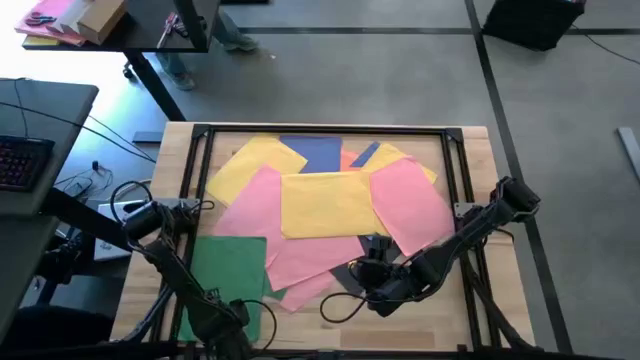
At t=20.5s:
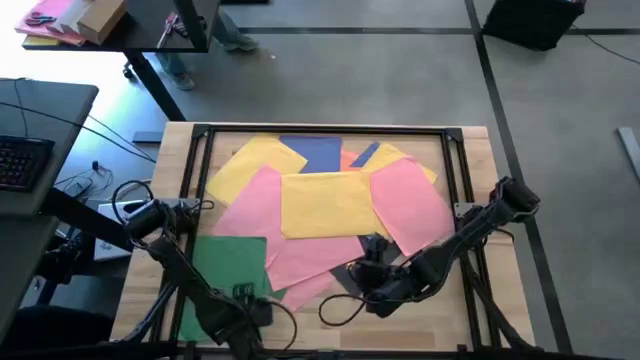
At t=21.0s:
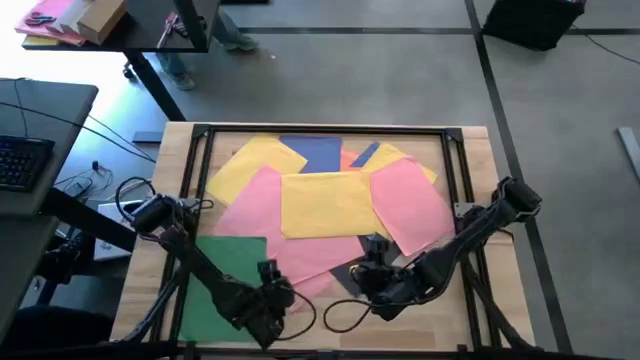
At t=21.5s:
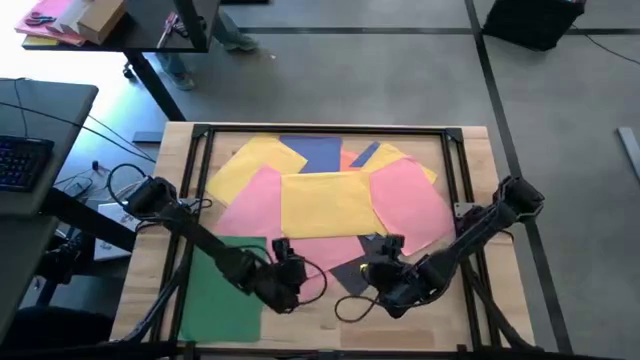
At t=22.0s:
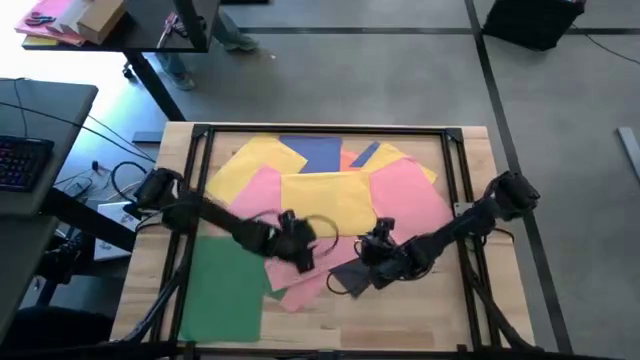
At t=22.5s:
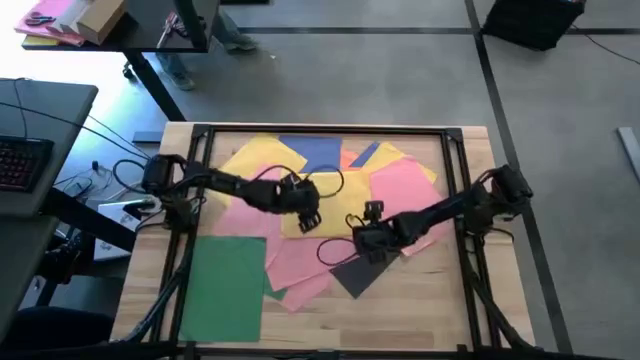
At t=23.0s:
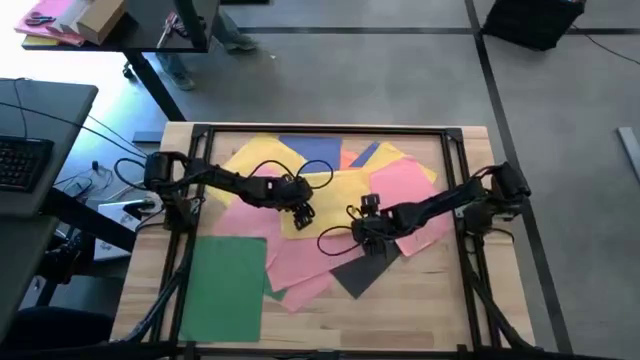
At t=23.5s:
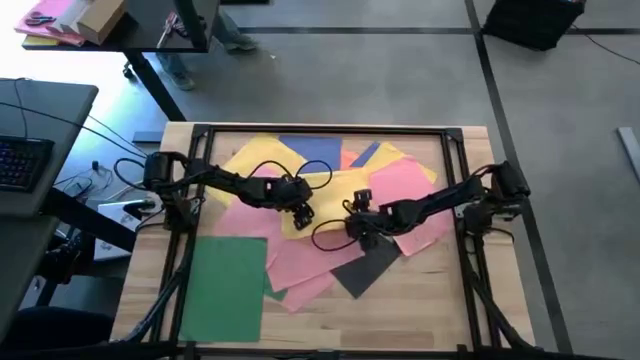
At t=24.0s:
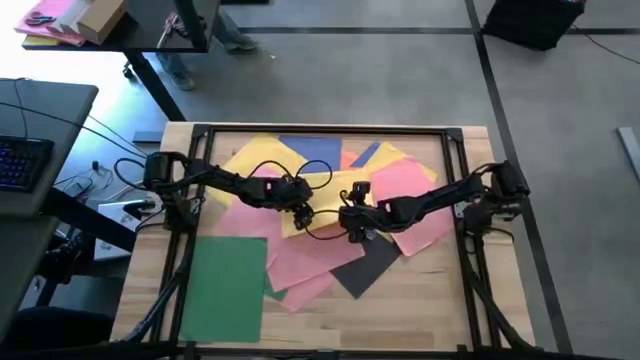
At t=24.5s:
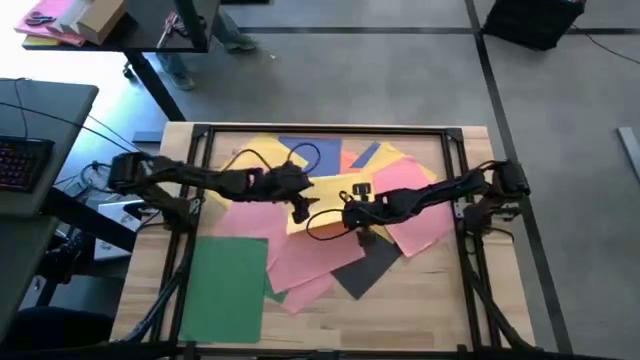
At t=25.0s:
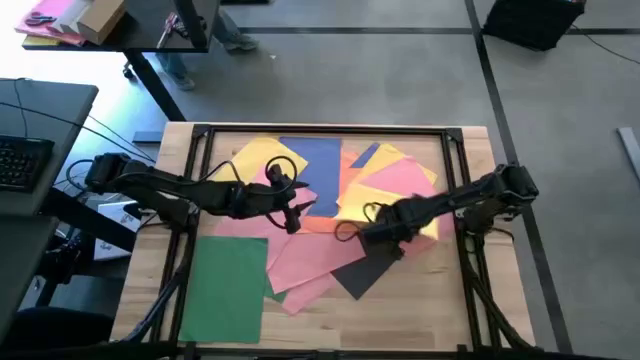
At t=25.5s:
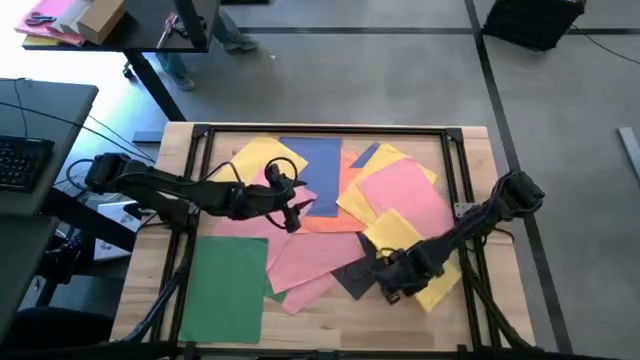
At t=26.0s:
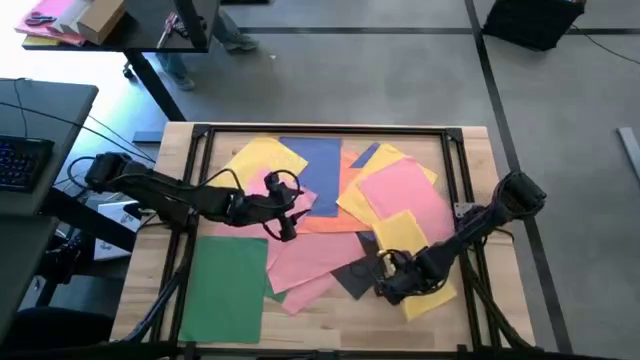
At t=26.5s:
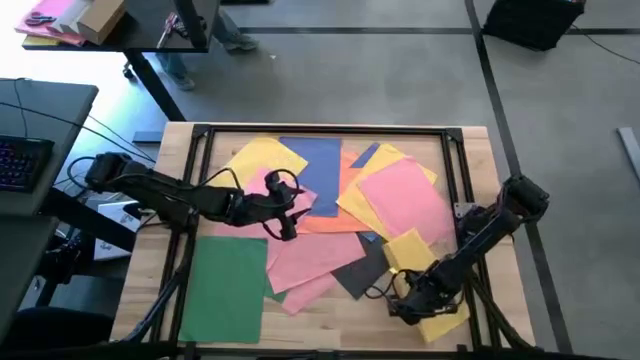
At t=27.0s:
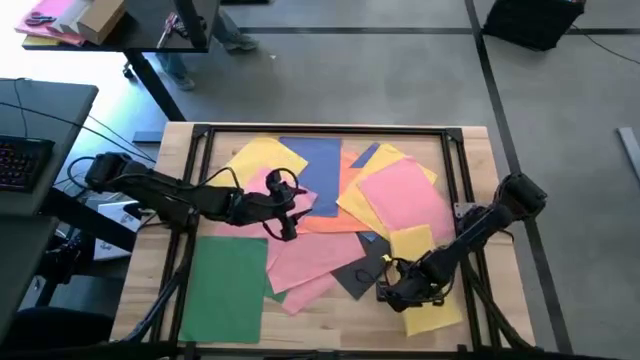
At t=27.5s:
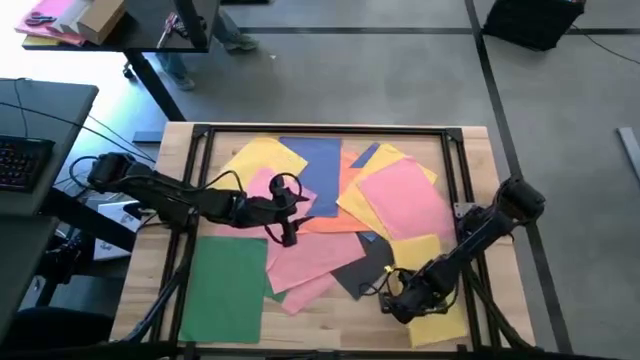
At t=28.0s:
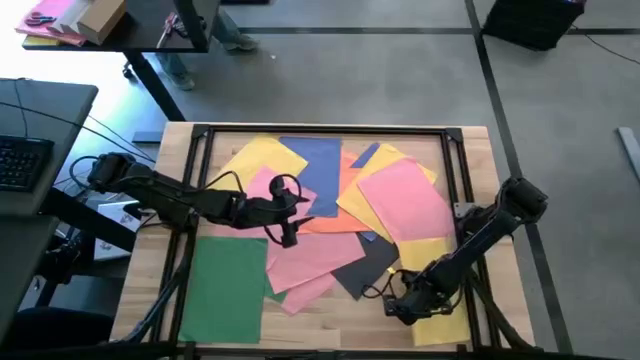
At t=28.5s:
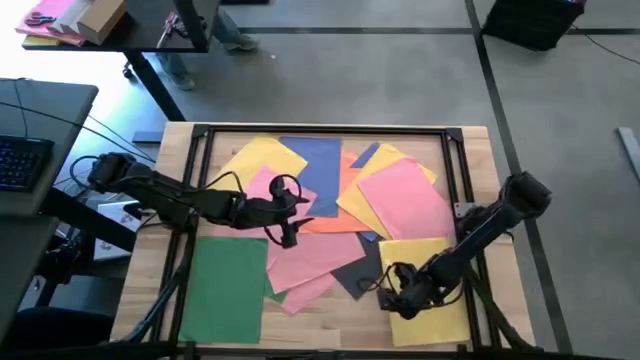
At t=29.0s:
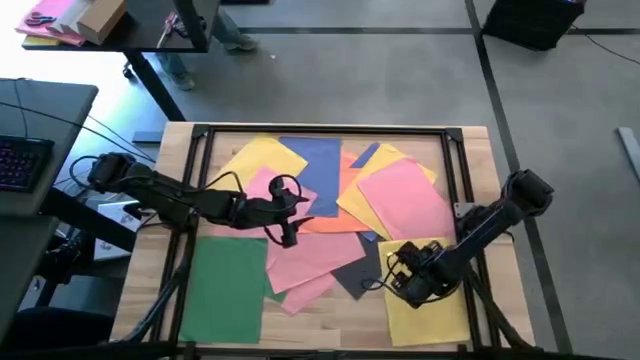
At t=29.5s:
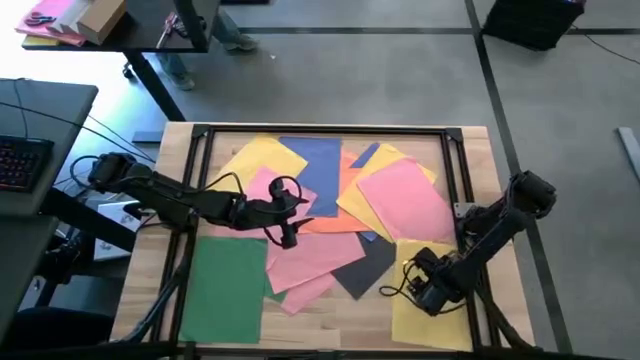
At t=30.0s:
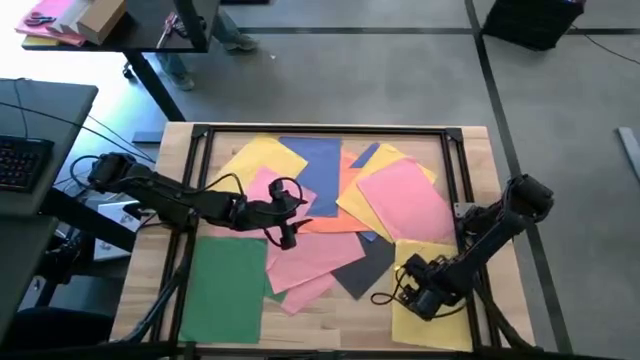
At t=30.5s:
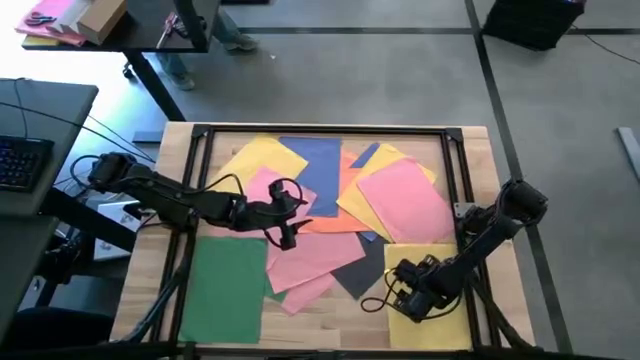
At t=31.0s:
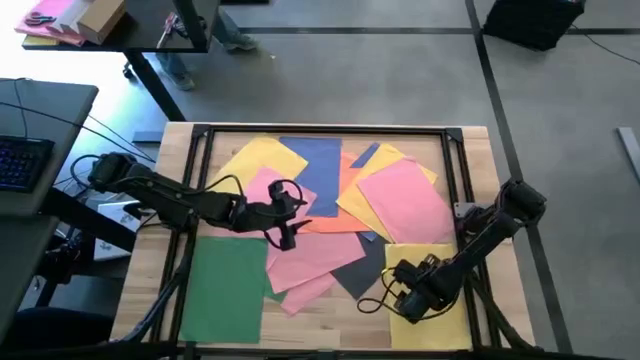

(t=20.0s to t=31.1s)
Task: Organize paper
Move the yellow paper to the bottom right of the table

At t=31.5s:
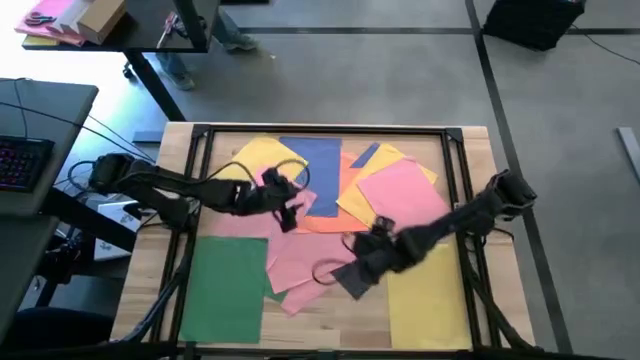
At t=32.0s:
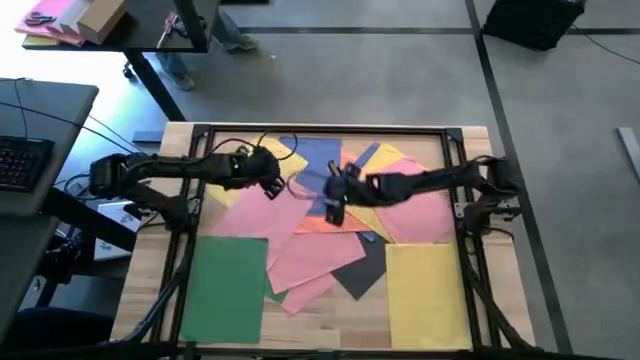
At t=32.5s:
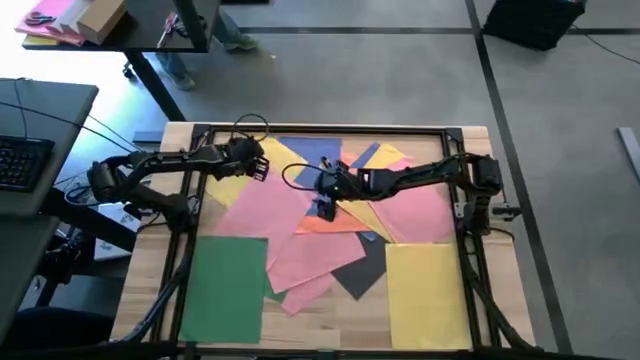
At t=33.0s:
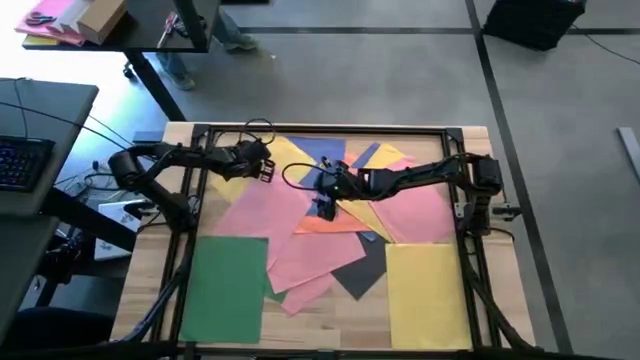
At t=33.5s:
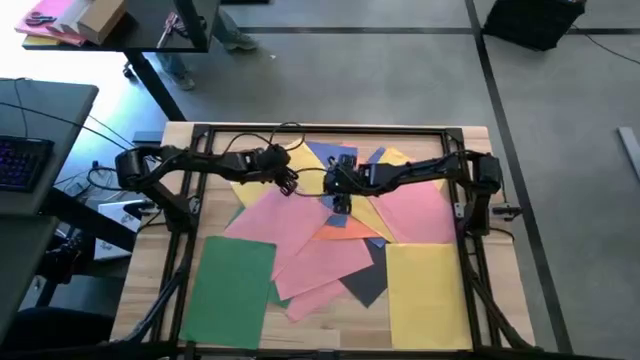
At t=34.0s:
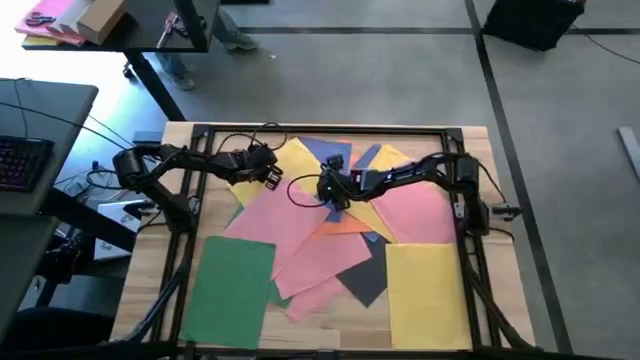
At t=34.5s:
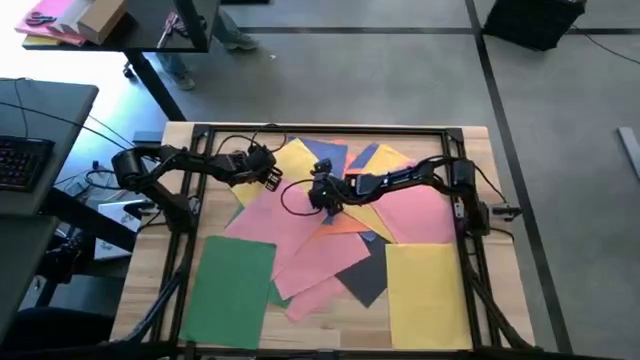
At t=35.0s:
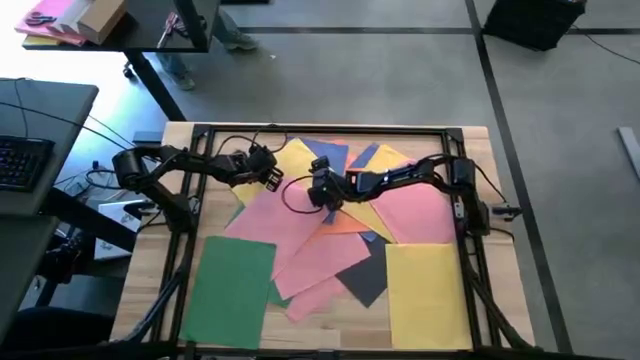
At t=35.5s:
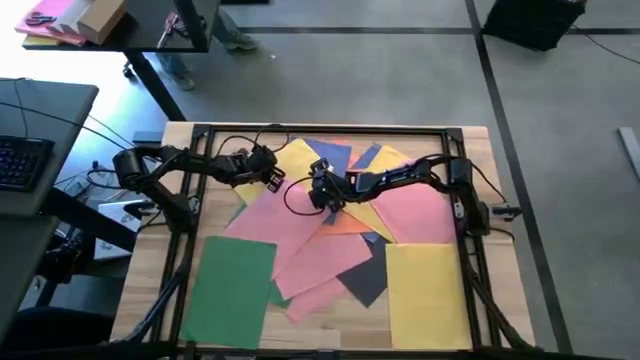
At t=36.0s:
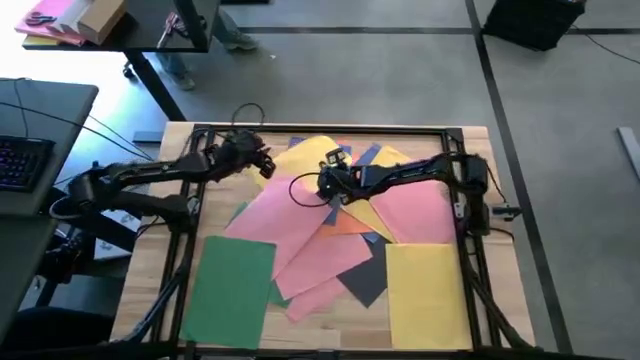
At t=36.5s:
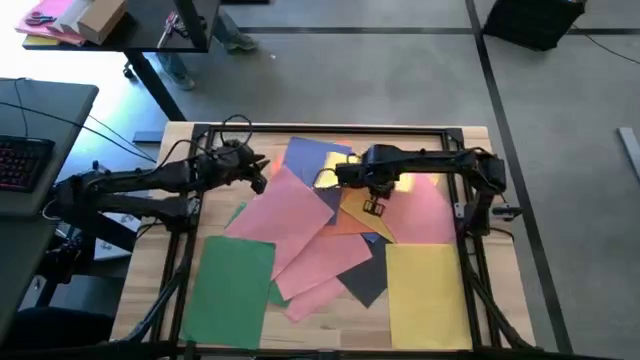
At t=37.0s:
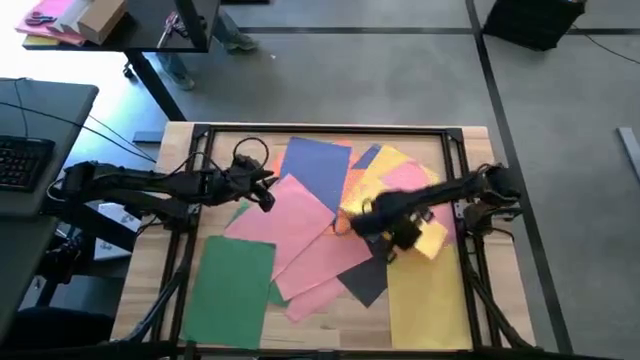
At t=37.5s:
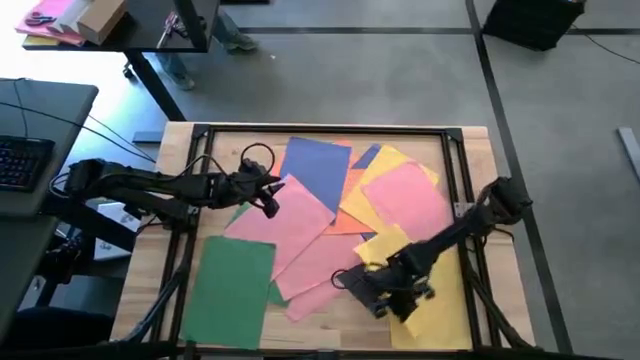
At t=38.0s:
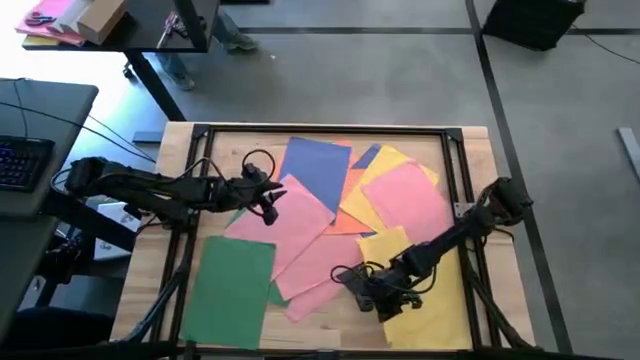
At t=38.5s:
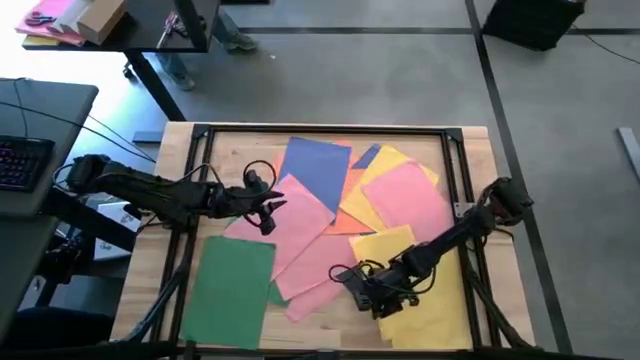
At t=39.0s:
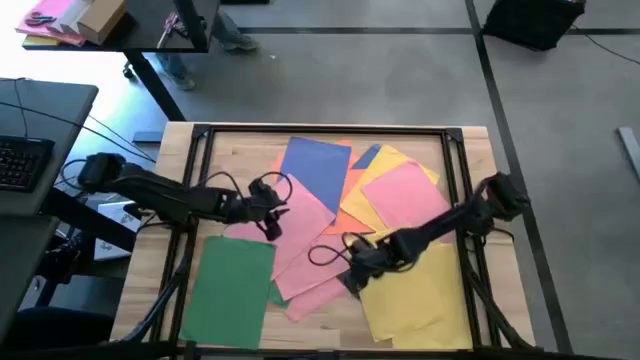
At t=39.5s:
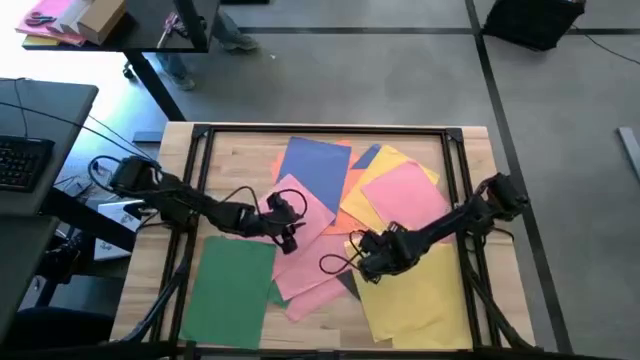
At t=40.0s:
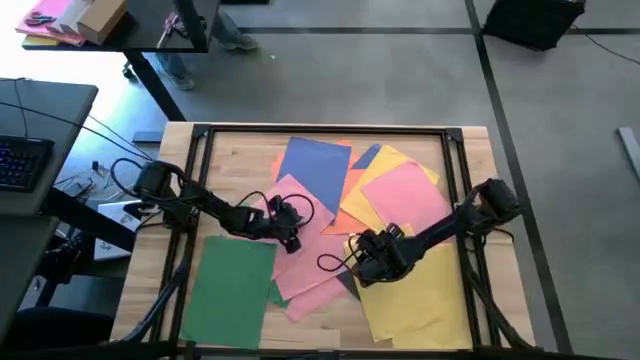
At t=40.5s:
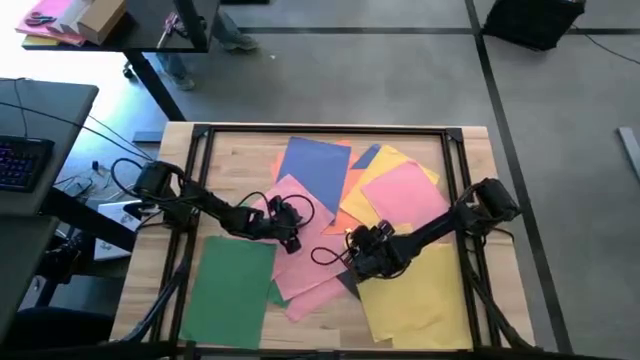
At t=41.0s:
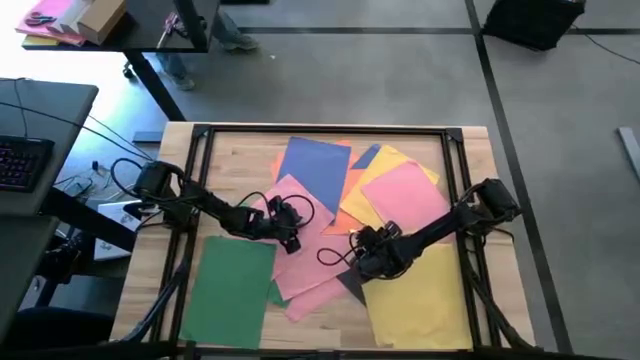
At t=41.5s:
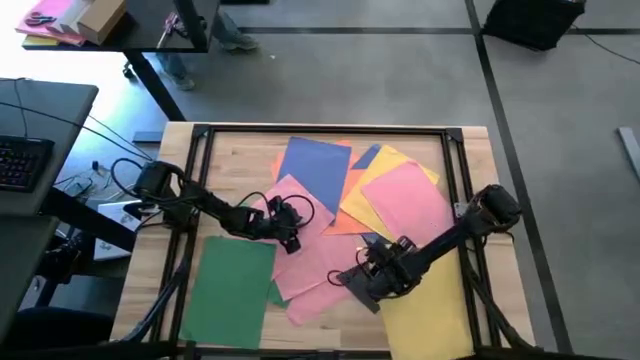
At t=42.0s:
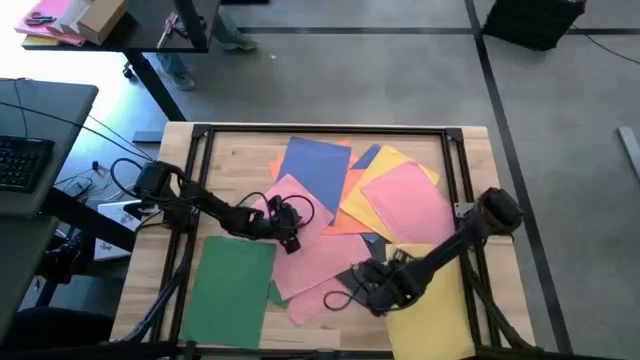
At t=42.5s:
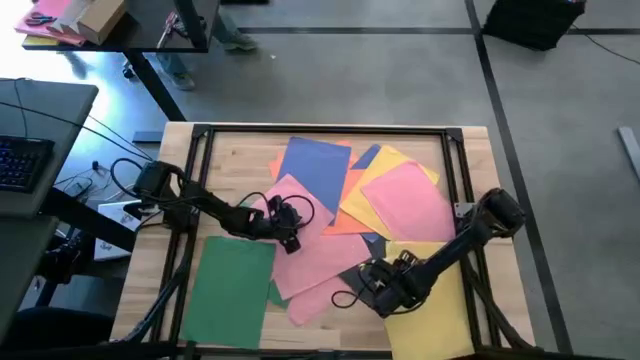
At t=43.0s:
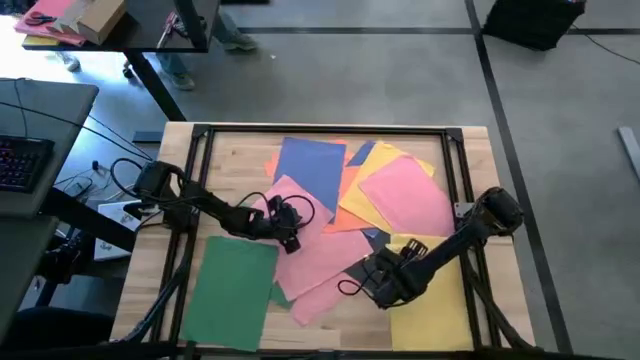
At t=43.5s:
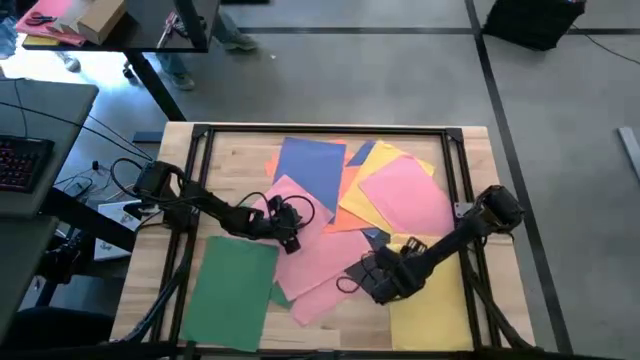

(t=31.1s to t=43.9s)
Stack the yellow paper on top of the other yellow paper to the bottom right of the table
